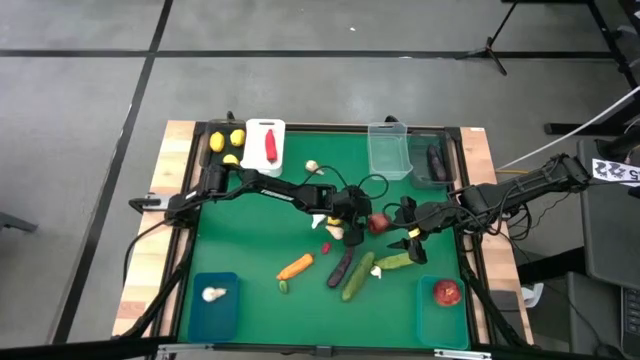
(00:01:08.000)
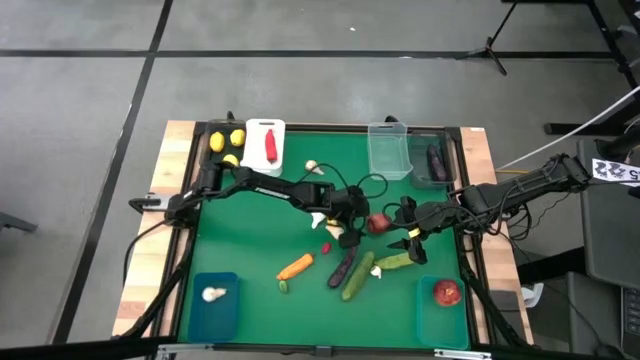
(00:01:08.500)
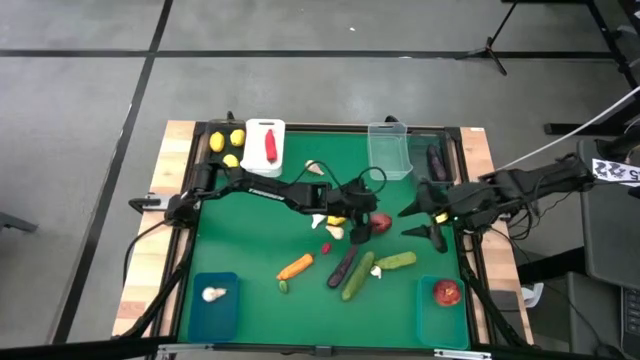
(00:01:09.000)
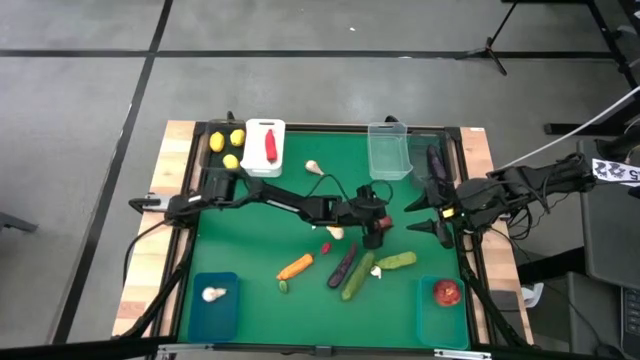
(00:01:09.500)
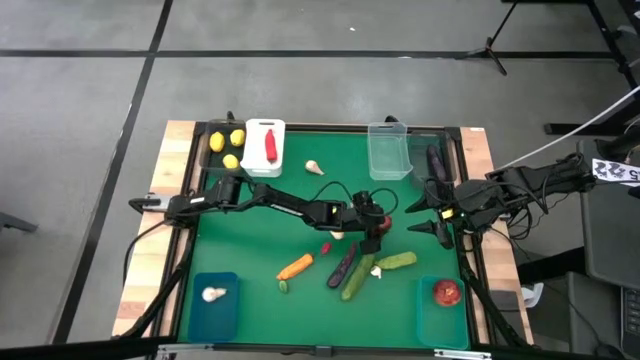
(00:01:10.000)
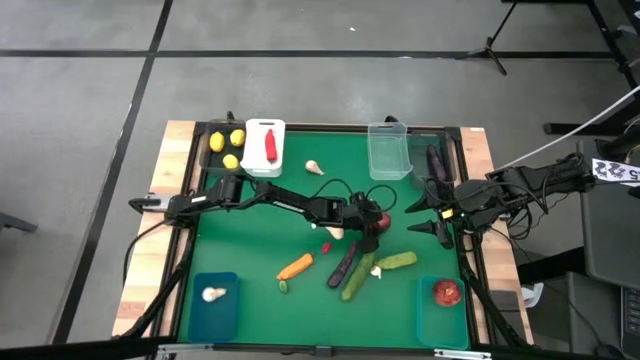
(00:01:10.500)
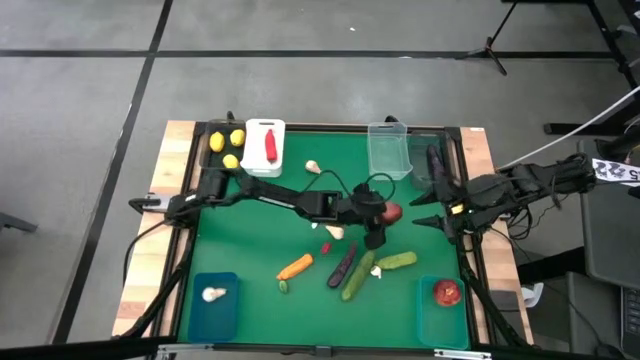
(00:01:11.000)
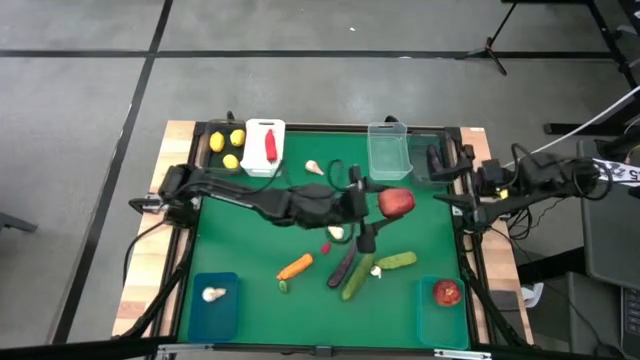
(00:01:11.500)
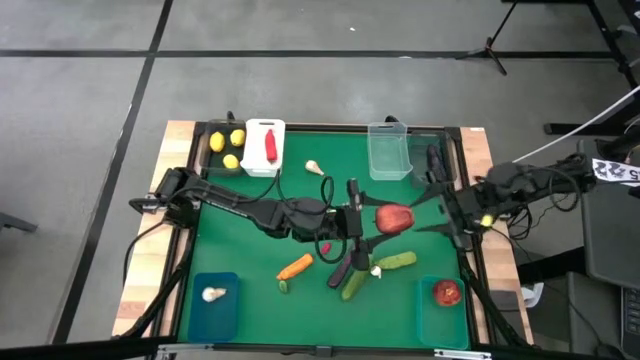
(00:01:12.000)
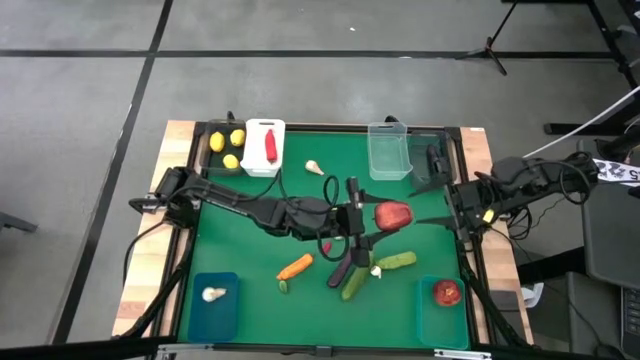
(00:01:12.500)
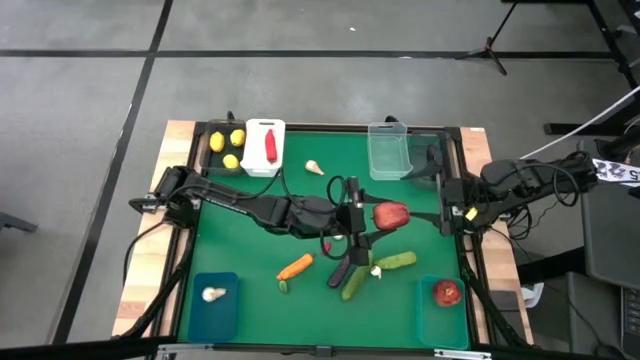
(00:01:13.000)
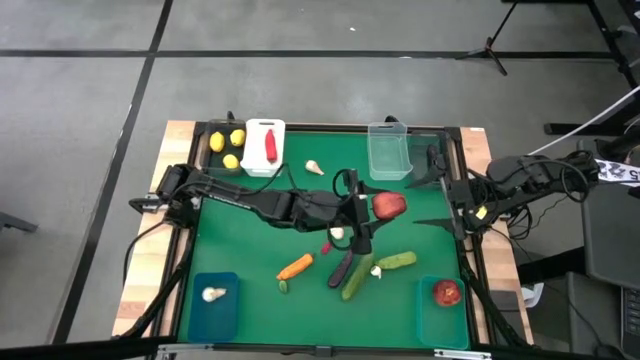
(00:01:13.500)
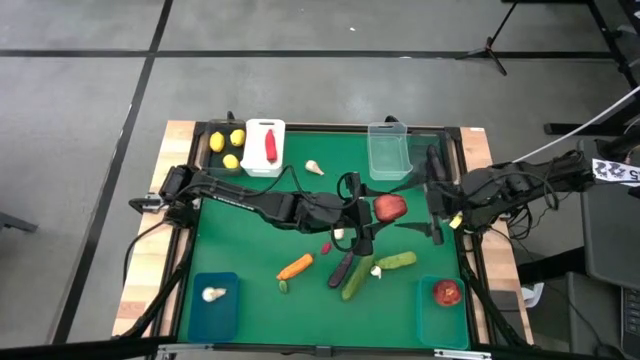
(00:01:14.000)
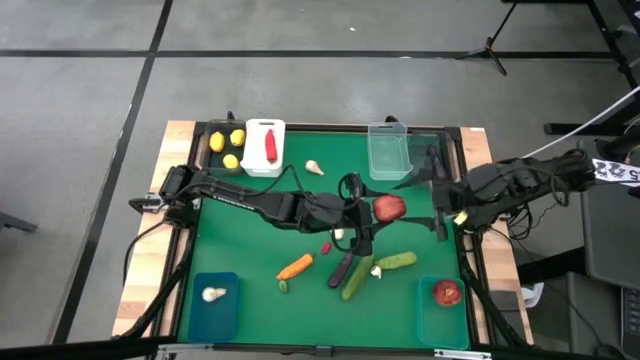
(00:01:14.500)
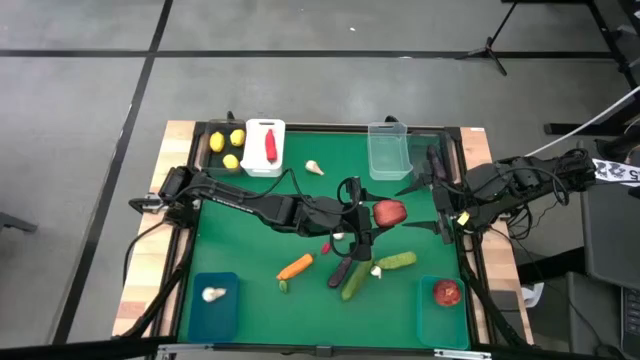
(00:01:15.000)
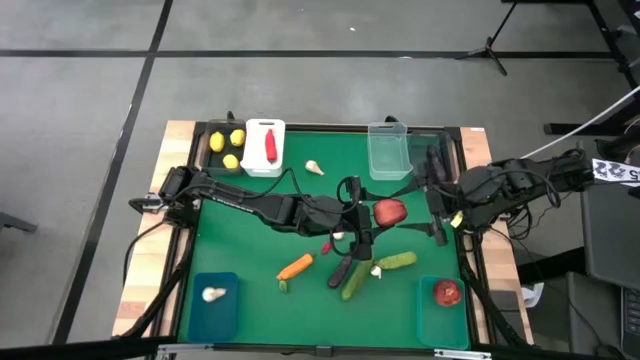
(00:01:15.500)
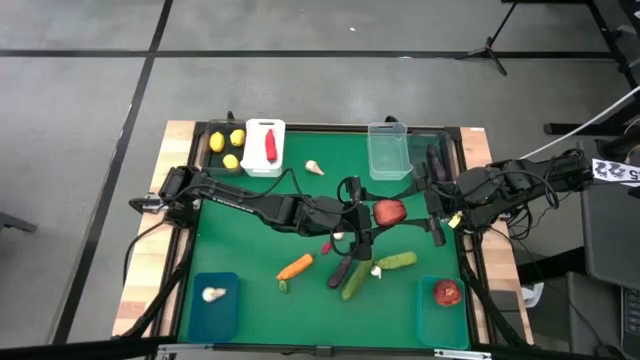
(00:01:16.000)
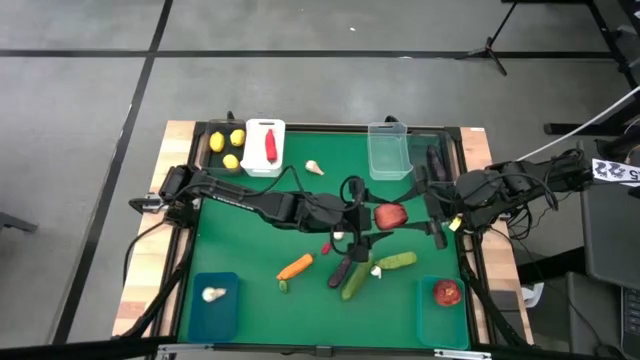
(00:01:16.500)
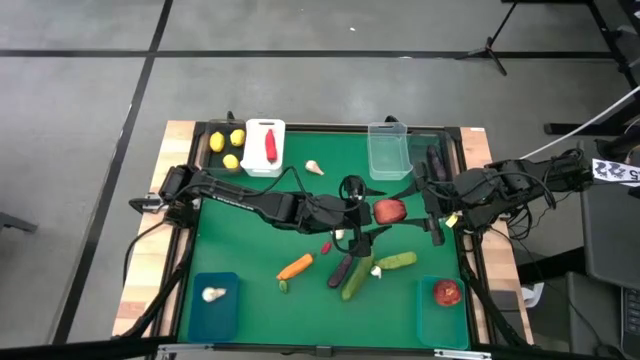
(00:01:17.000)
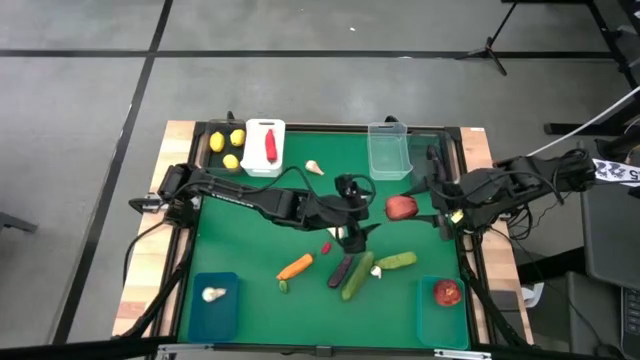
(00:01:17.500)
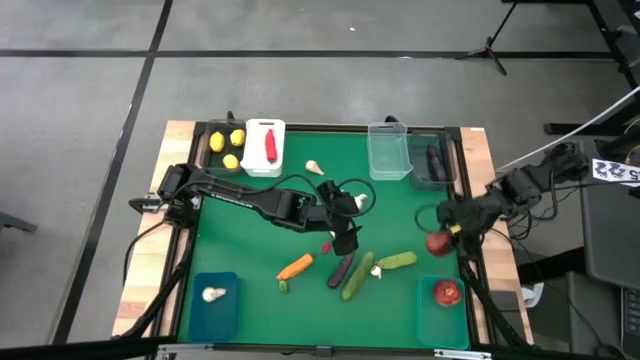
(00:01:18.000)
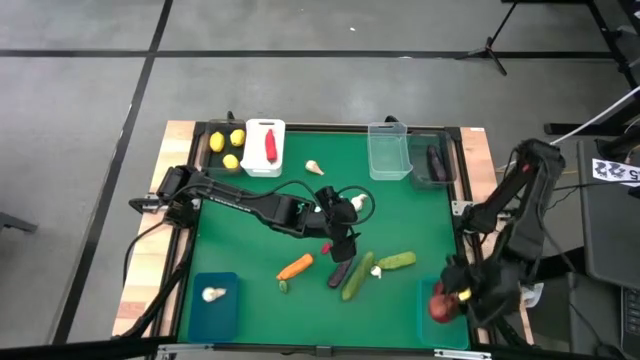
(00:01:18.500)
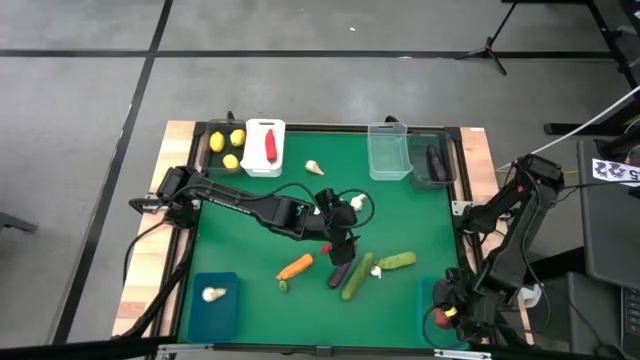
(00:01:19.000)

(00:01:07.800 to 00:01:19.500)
Task: Sort produce into baskets
Put the apple into the green bin

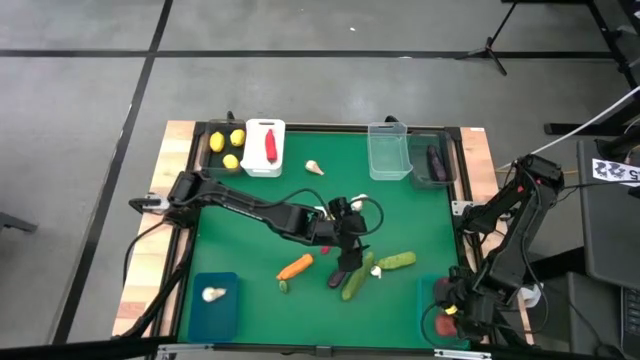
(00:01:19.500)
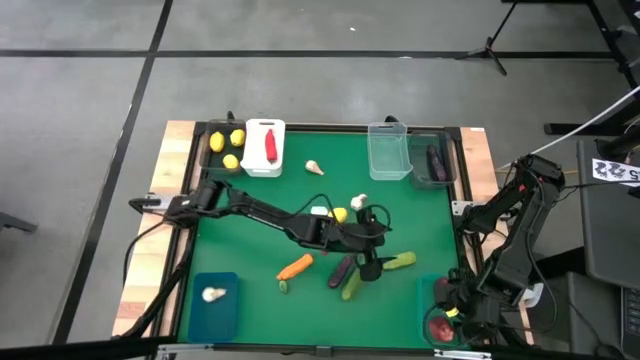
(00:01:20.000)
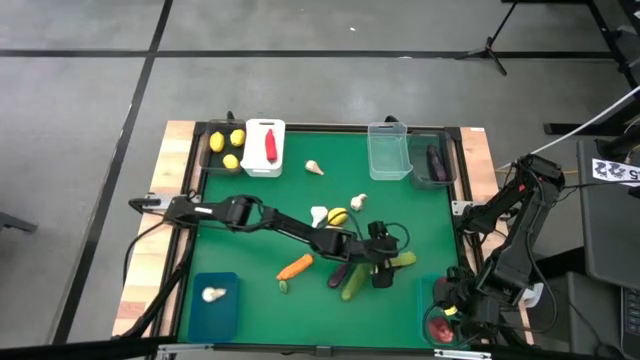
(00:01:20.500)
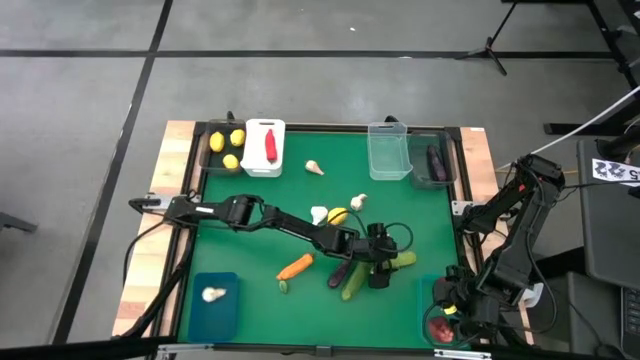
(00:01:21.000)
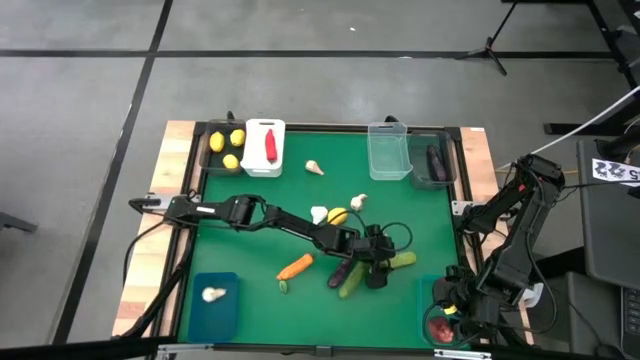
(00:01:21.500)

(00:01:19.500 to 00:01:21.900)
Put the cucumber into the transparent bin

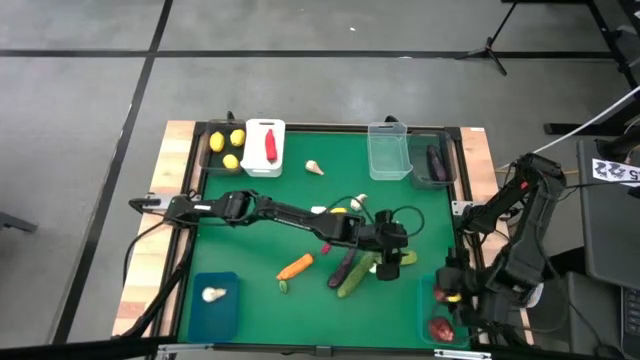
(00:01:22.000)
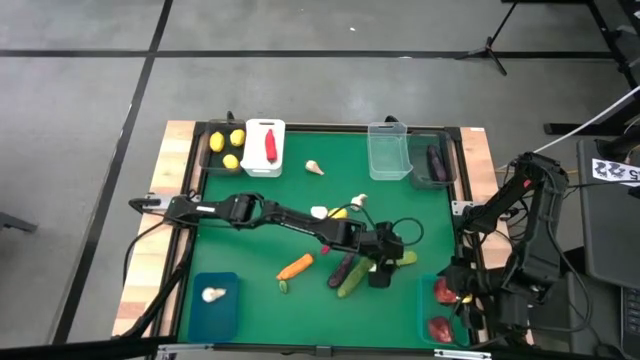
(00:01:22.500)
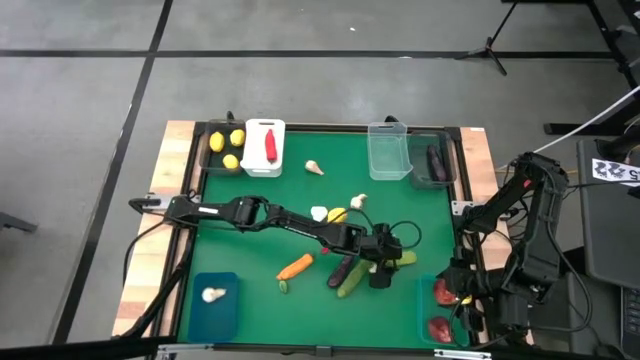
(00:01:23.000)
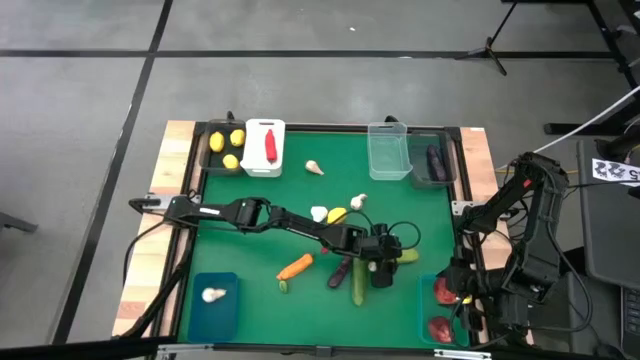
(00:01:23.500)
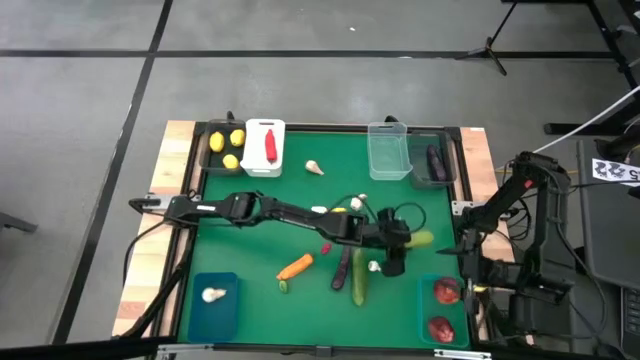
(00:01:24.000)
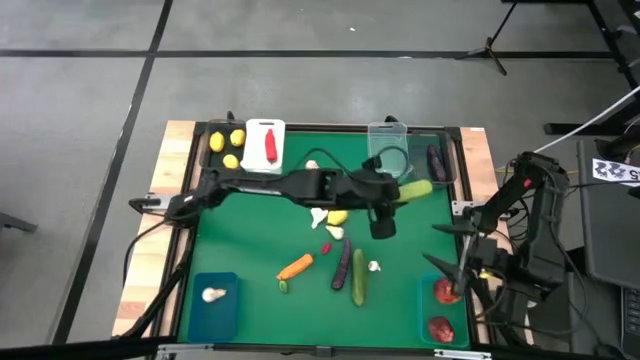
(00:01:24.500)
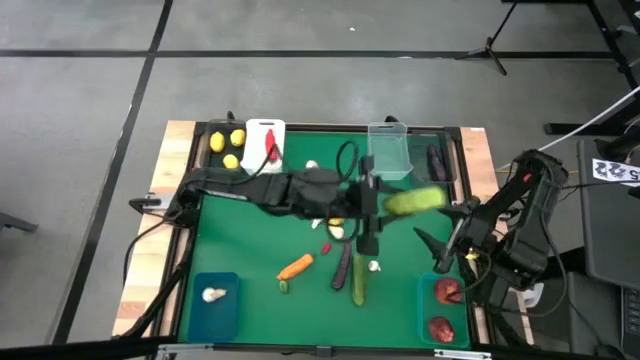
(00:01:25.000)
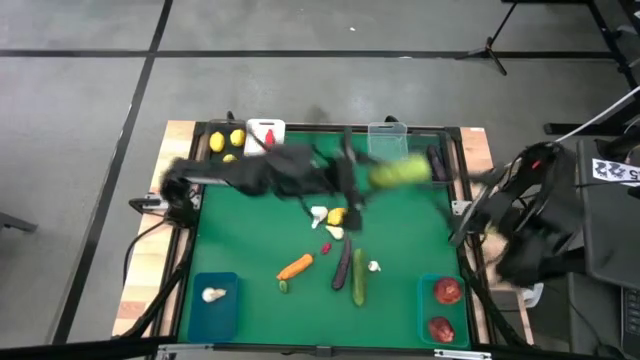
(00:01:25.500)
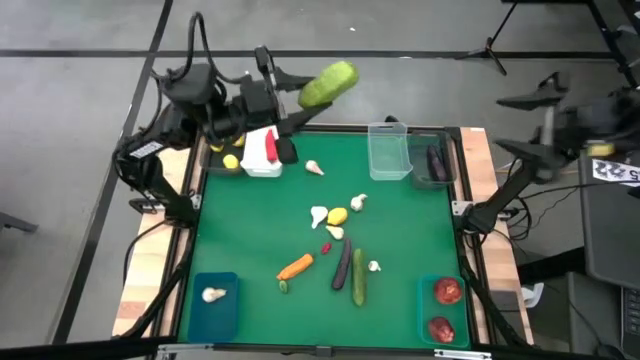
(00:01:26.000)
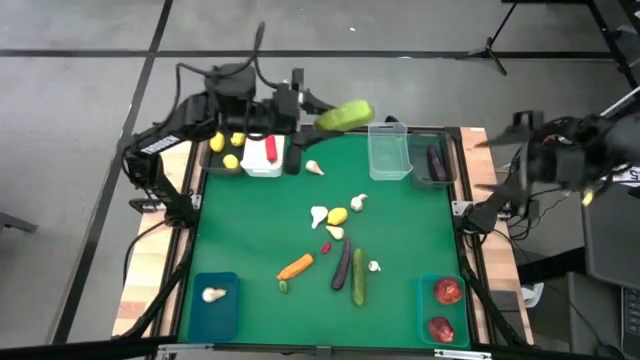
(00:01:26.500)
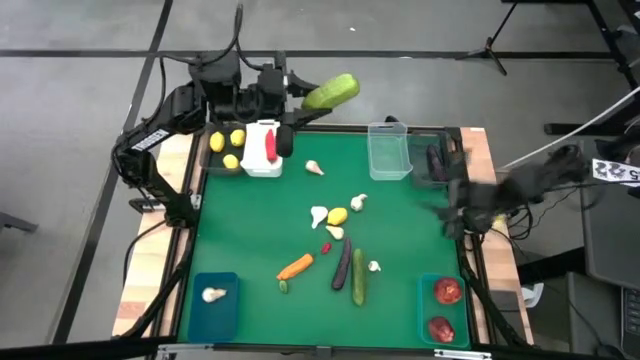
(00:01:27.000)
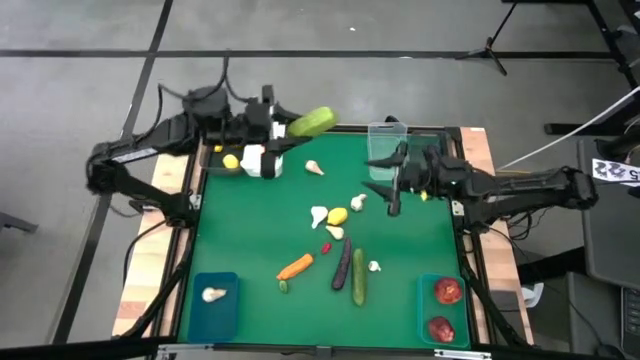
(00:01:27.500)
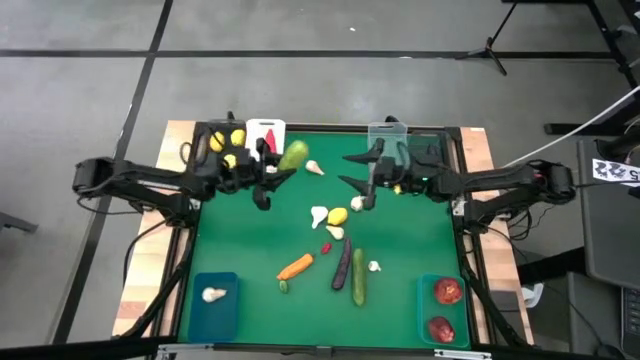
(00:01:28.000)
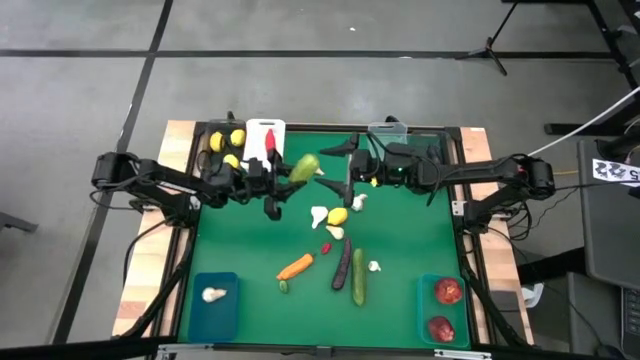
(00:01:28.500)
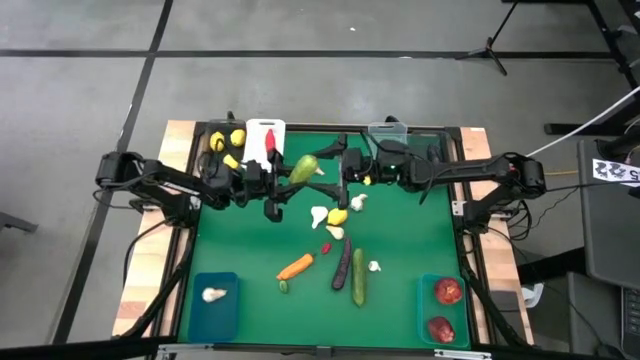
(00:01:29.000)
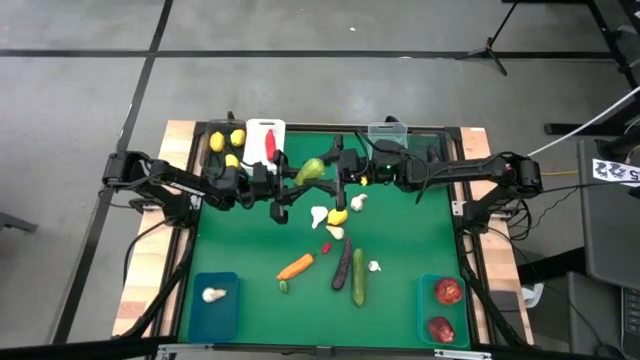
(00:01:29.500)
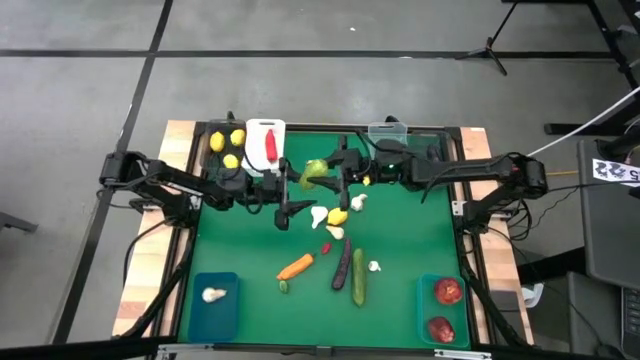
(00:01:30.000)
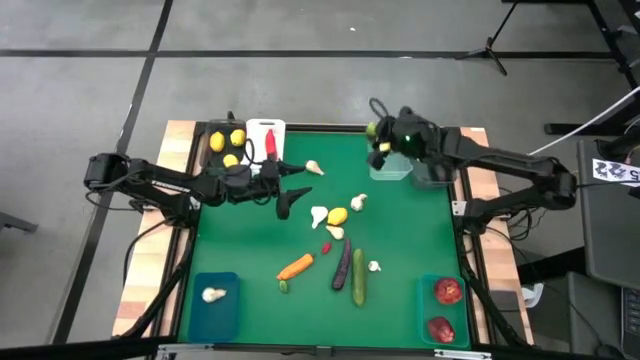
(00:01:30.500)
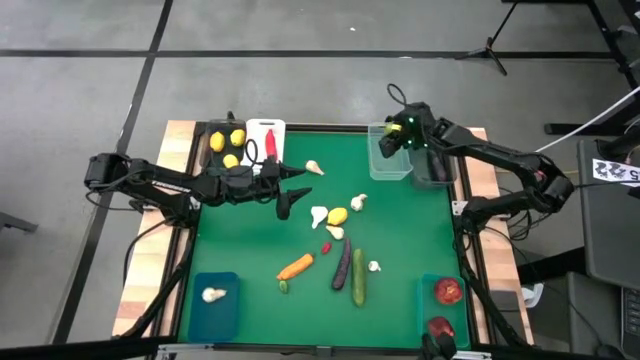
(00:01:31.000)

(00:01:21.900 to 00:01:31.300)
Put the cucumber into the transparent bin
